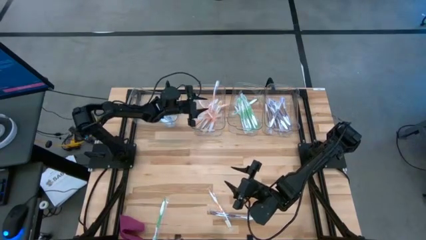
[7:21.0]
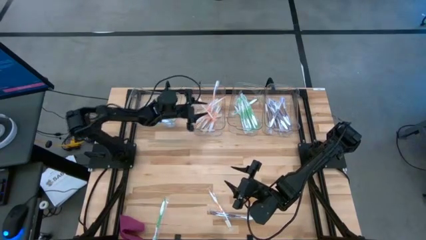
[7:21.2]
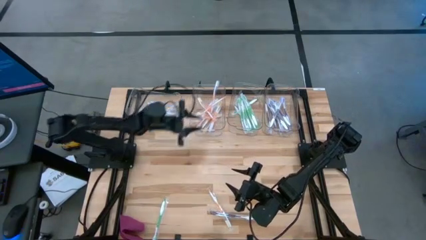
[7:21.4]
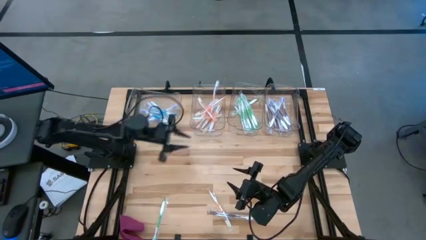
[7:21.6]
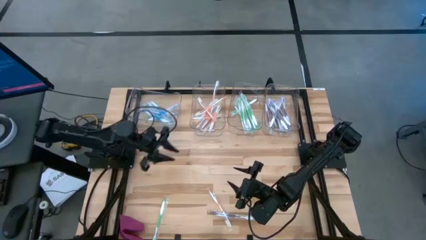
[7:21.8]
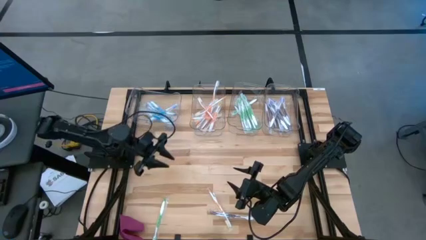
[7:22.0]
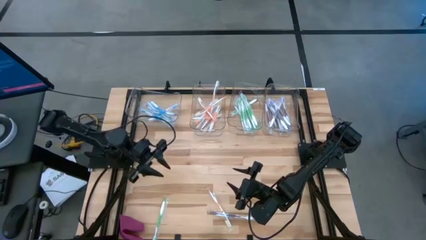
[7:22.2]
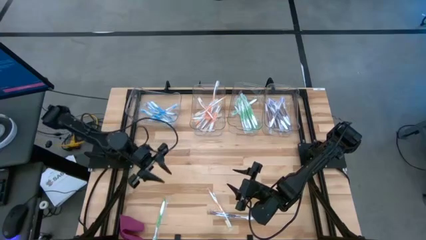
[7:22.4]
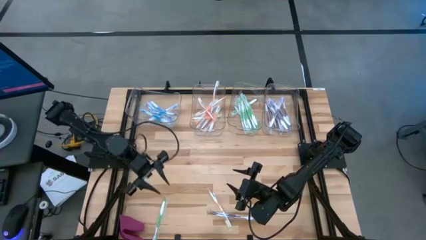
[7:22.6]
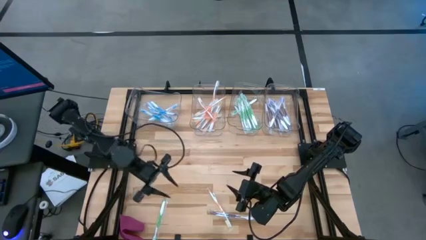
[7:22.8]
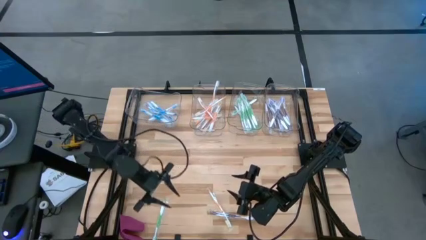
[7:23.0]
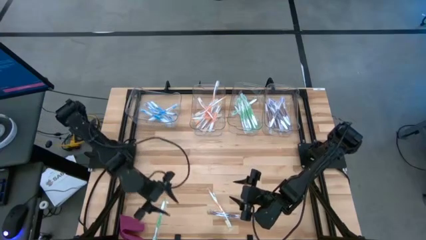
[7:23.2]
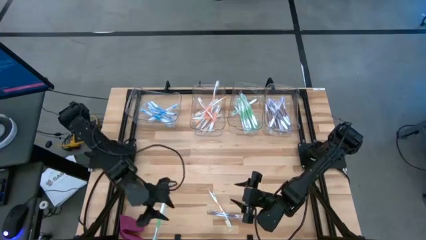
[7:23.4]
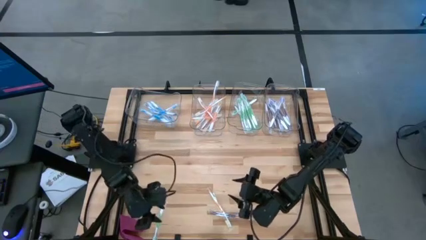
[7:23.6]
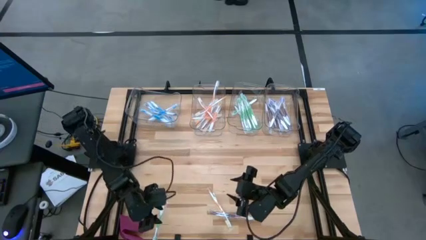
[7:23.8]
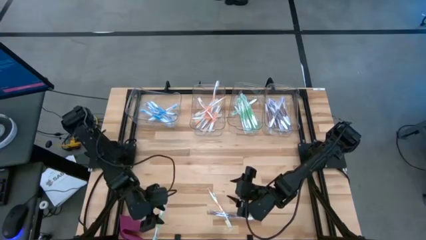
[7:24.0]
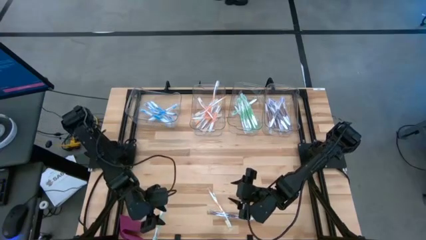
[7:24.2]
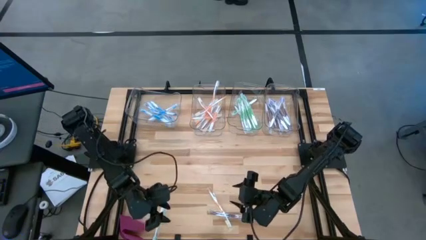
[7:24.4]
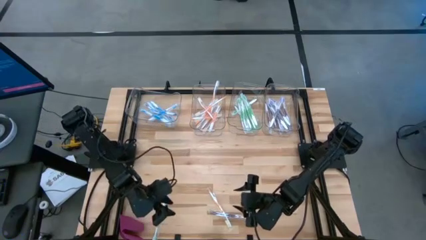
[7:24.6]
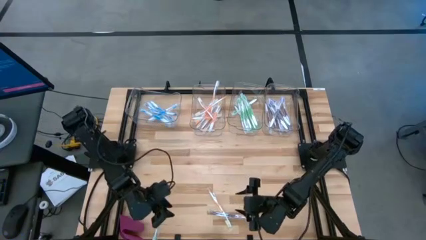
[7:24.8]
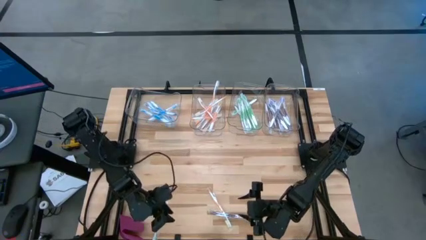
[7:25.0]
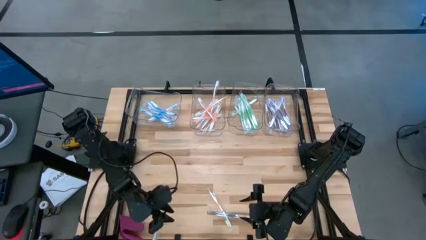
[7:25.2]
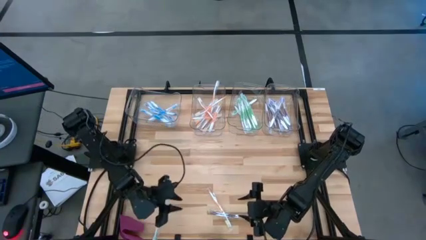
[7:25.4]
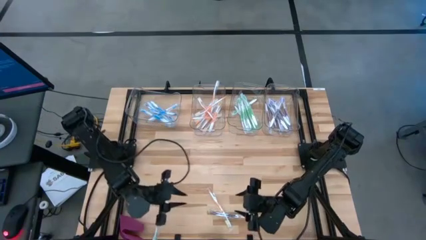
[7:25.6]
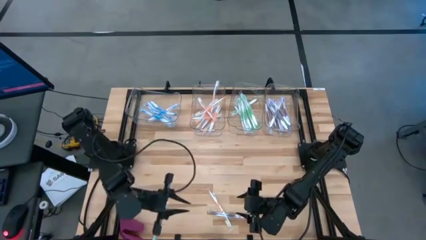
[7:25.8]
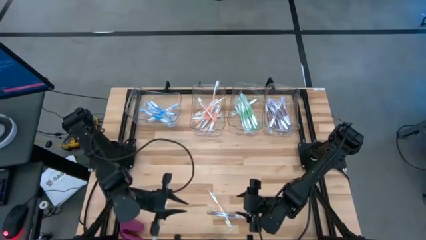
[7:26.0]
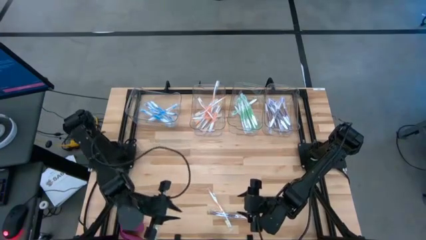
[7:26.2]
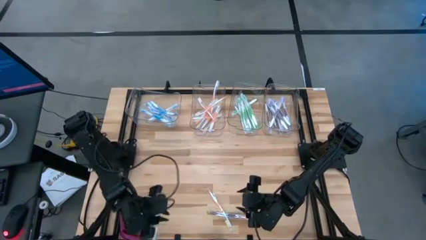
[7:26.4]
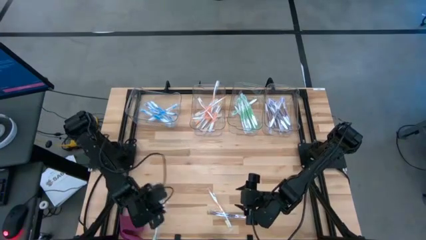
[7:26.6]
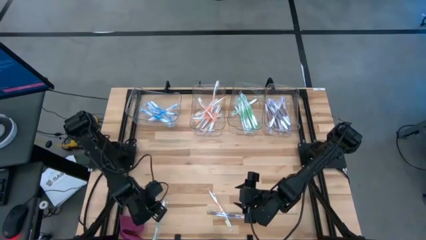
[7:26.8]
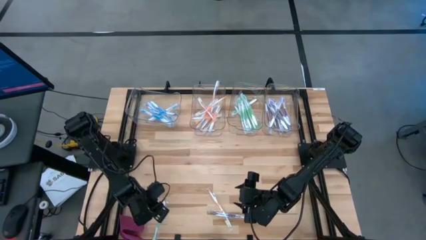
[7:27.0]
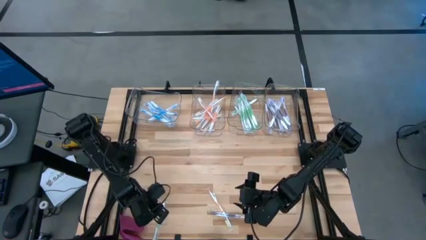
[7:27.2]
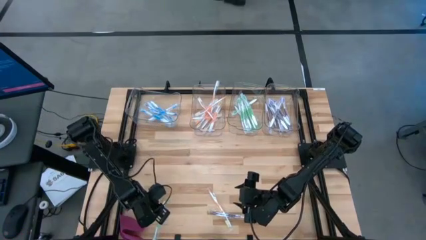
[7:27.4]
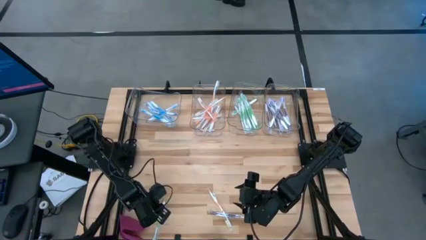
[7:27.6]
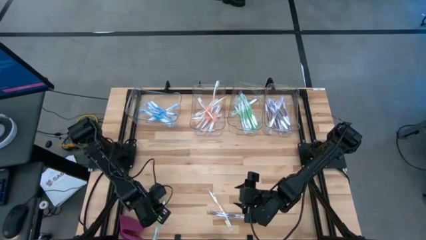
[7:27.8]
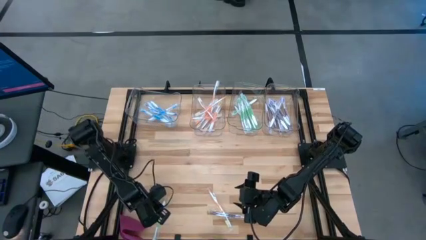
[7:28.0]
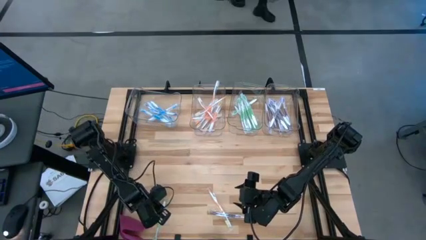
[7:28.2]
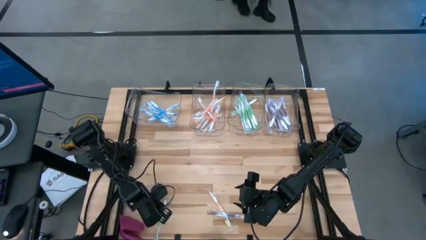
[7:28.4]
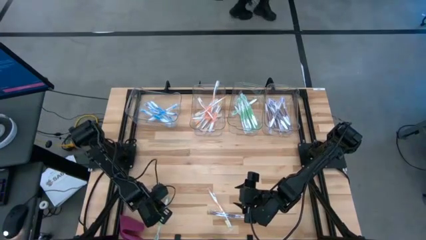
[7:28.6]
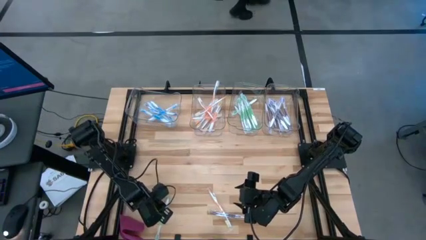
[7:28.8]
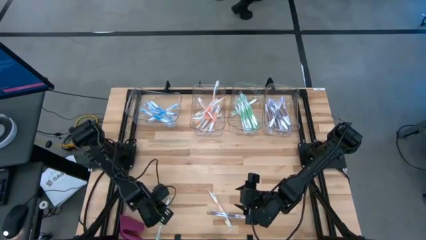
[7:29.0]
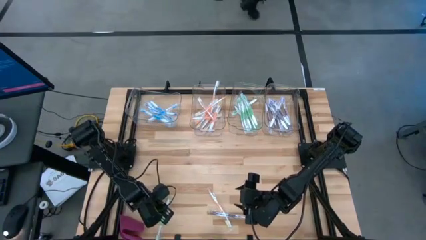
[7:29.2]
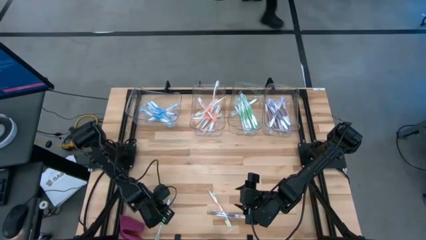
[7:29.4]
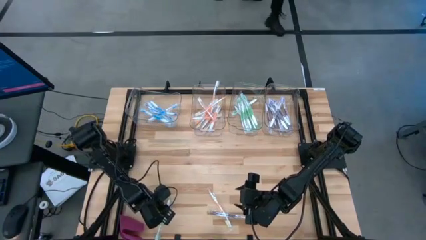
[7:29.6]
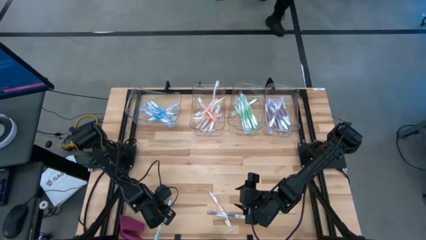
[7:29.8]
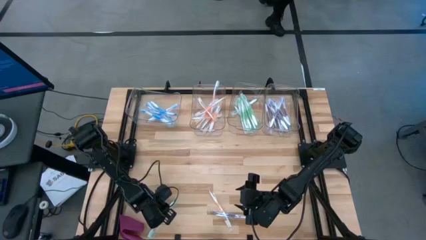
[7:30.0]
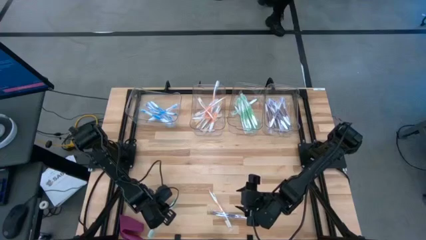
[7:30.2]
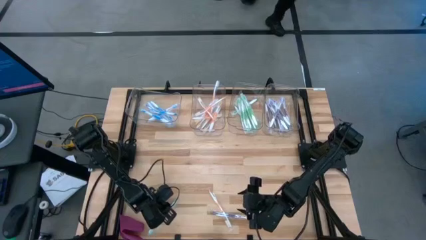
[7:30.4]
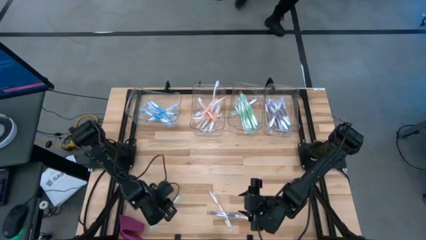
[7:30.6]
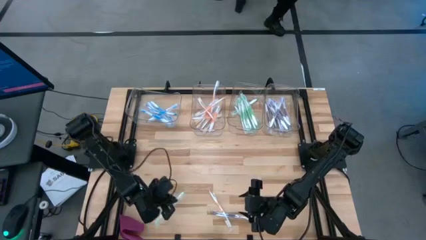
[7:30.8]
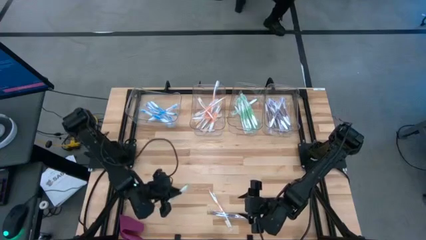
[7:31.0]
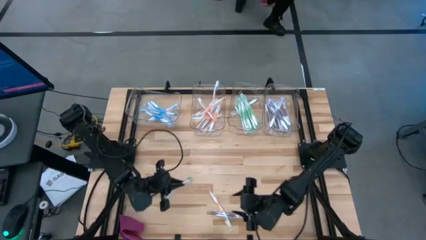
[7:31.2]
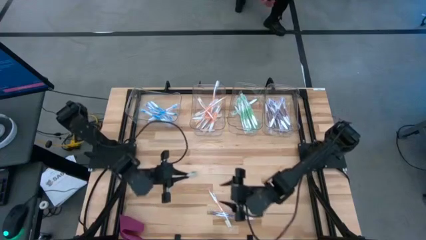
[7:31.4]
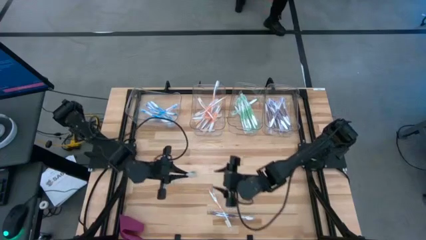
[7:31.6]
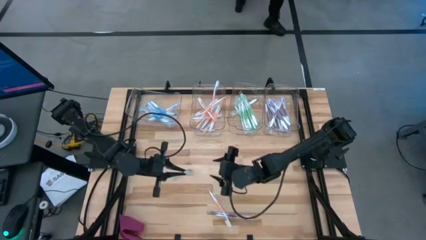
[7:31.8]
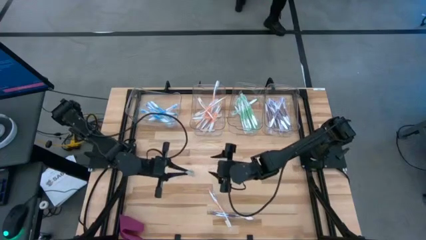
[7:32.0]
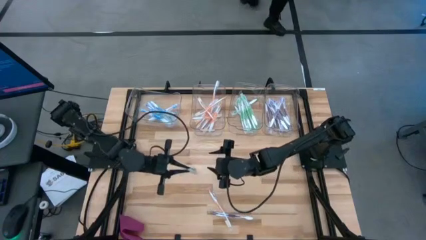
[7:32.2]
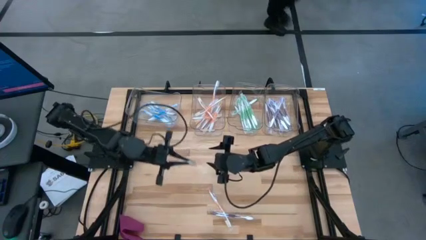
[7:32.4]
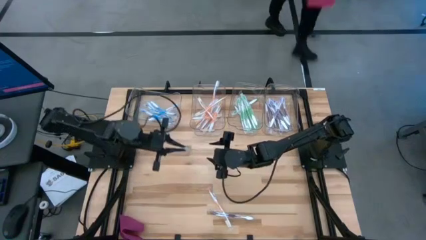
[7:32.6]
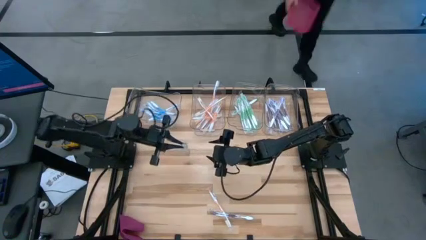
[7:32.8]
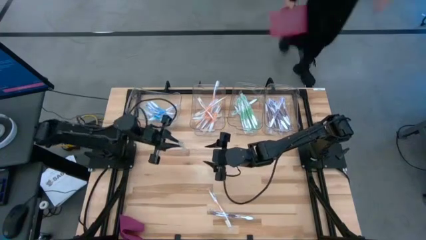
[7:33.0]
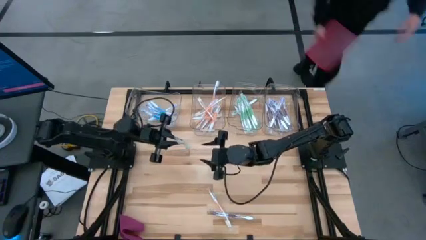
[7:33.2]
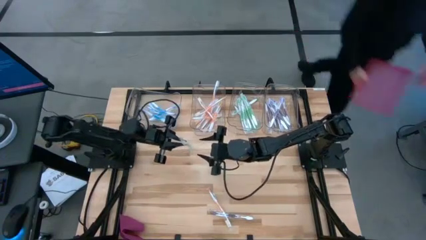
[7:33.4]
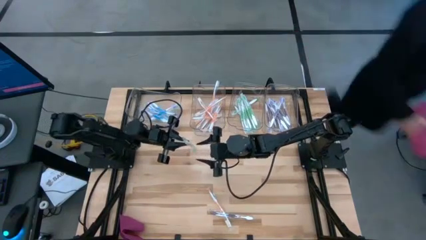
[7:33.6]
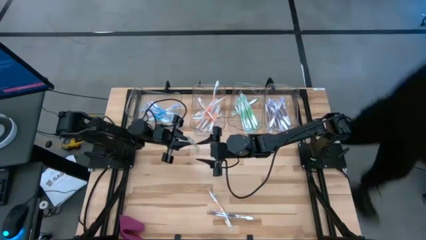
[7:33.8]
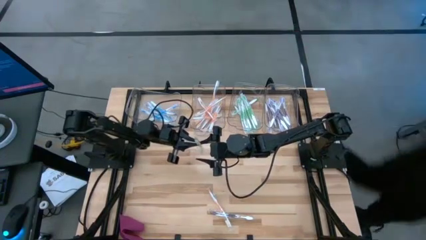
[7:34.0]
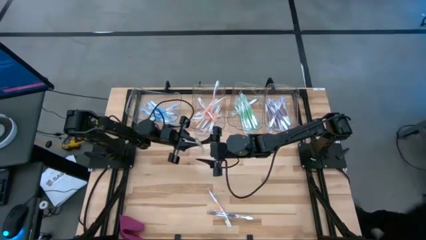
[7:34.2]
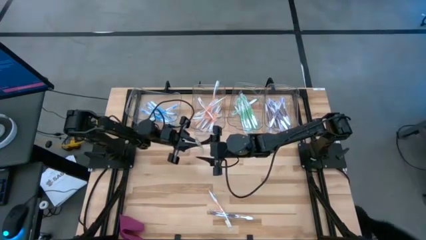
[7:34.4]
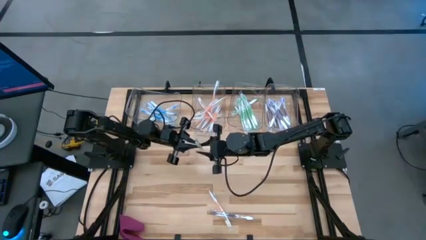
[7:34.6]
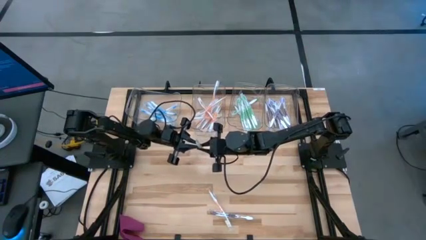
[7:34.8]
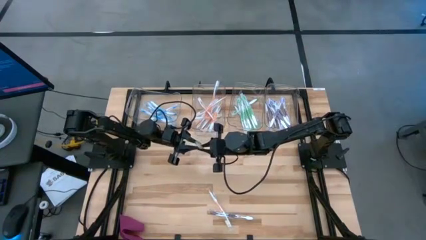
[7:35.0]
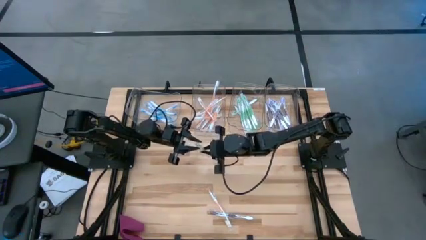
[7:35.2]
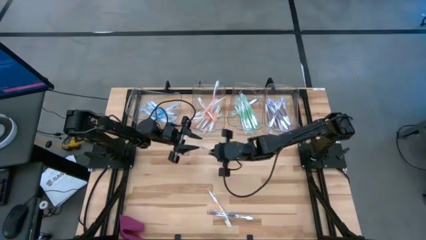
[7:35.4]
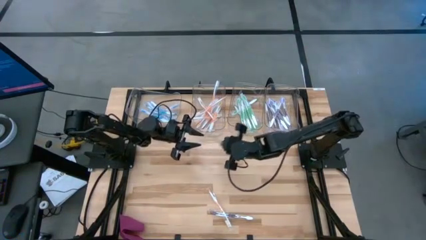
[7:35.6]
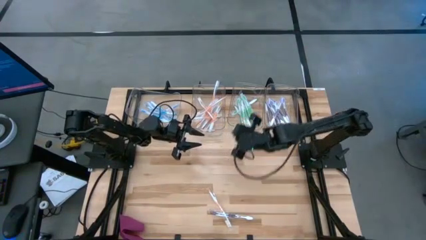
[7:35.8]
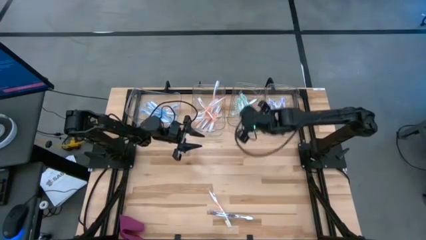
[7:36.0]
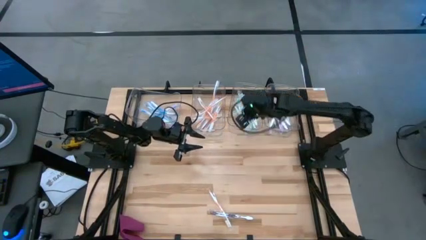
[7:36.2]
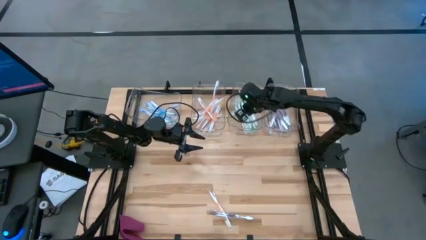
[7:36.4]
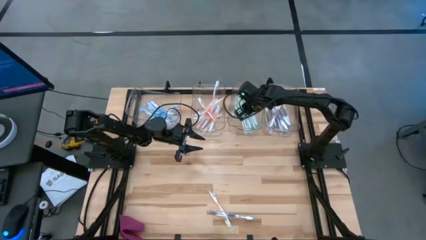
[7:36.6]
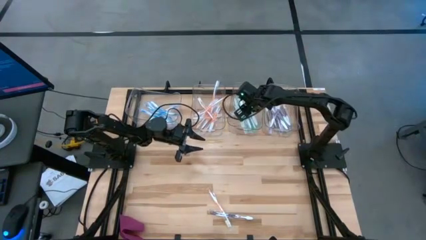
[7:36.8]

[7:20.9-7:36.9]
Task: Pick & Place Toothbrushes
Put the green toothbrush into the middle right transparent bin
